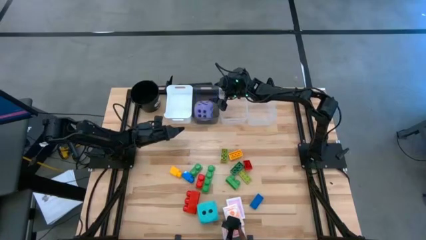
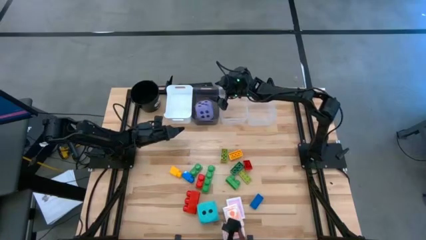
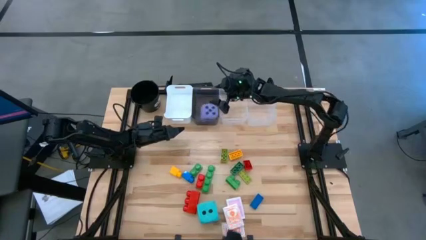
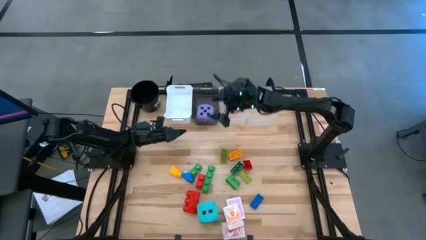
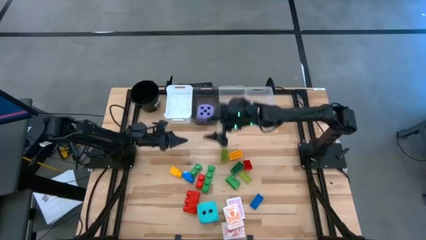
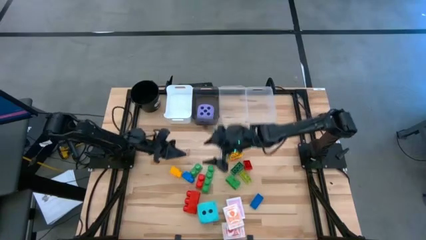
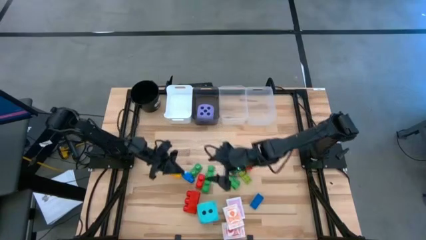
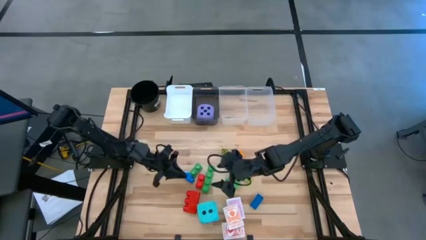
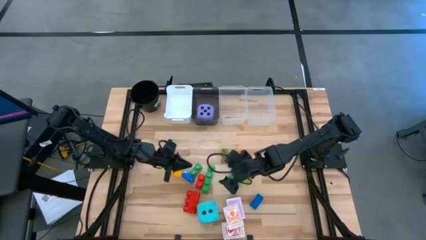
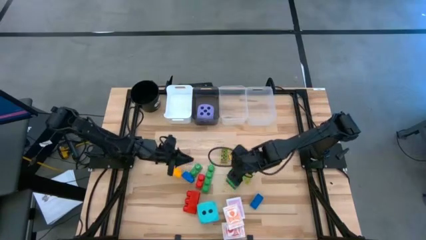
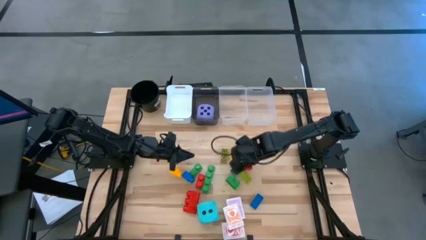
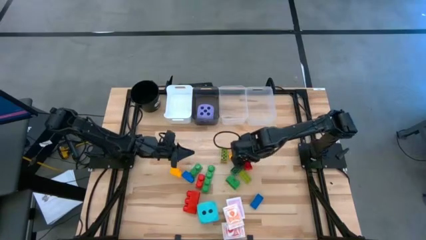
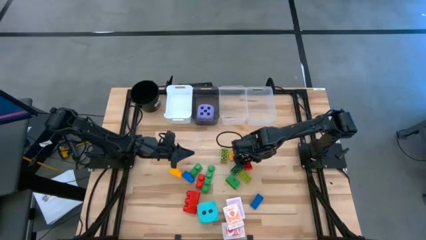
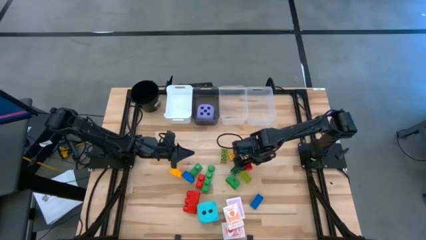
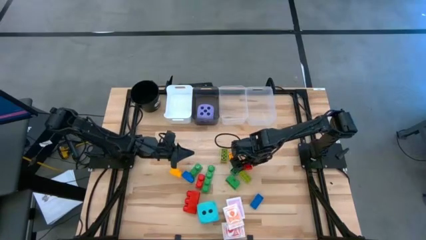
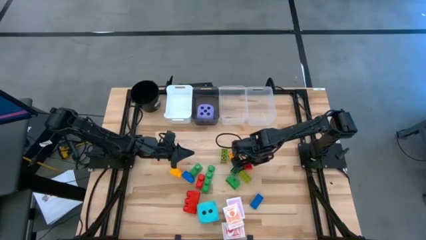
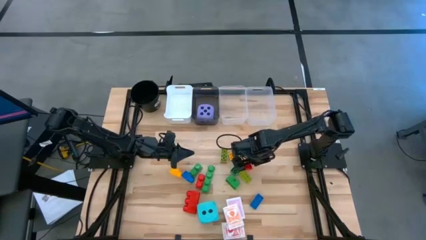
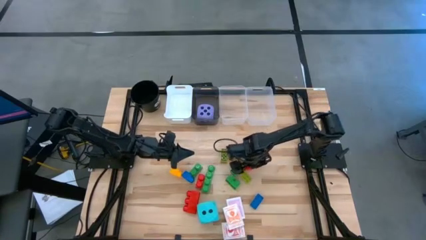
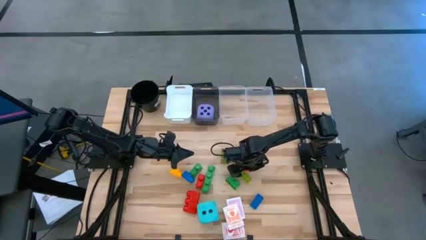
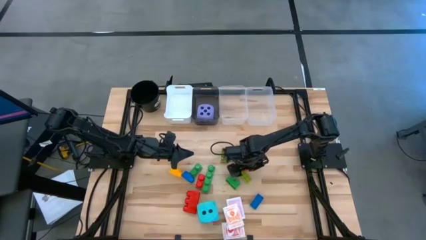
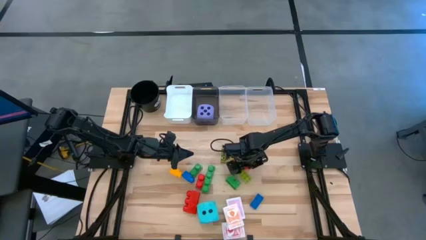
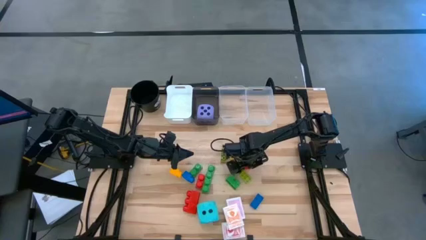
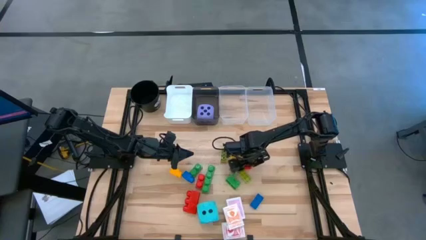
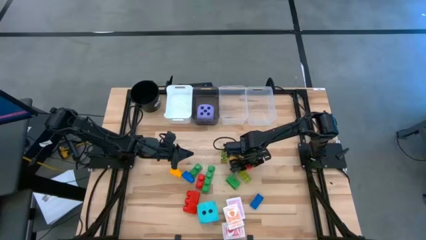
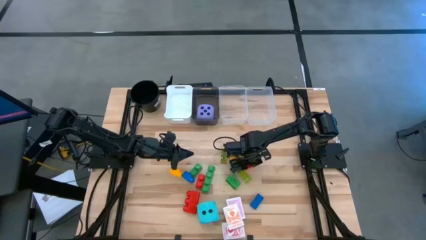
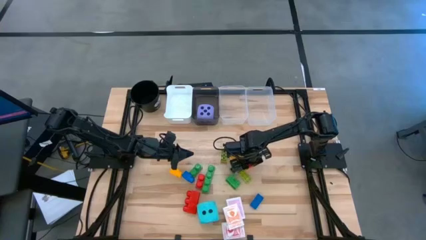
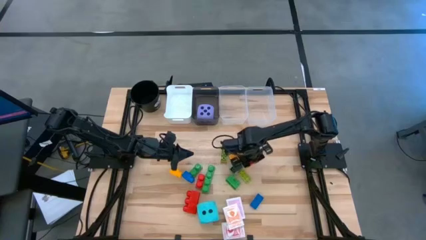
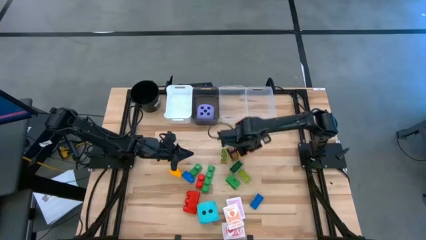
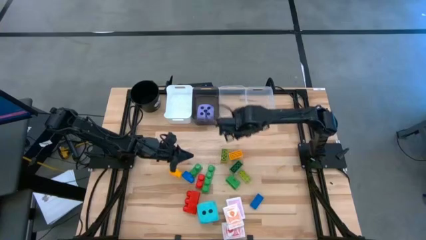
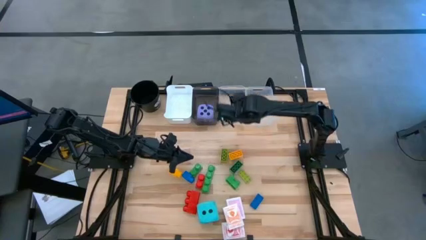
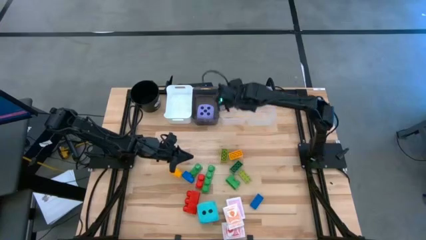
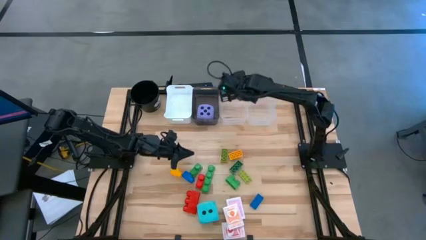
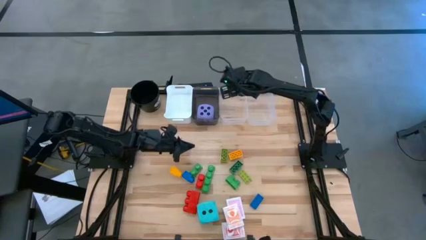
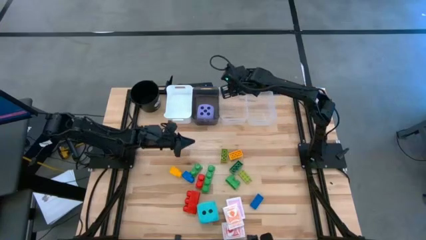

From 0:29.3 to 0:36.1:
Task: Pick & Place Toys
Put the red triangle game piece into the left transparent bin

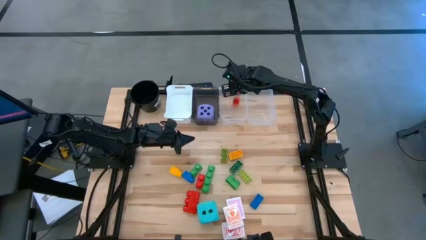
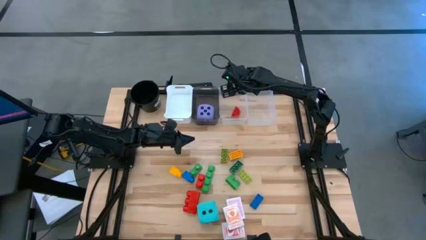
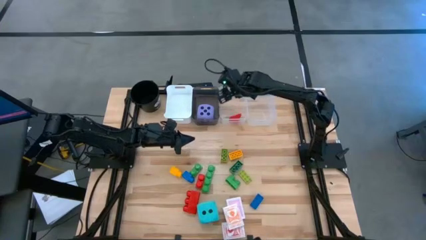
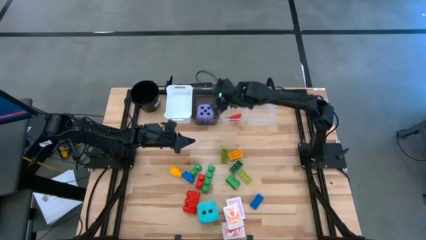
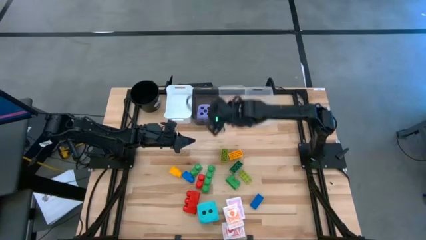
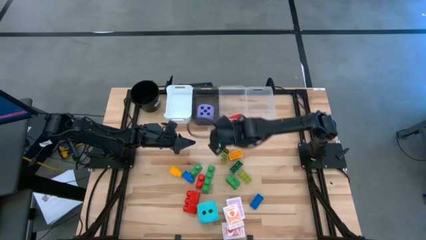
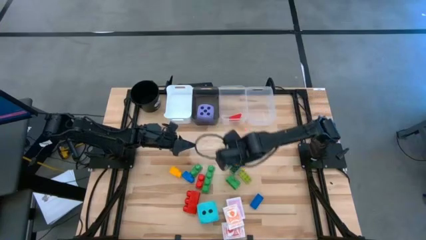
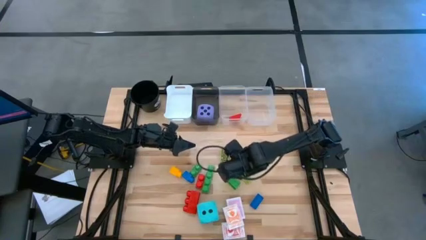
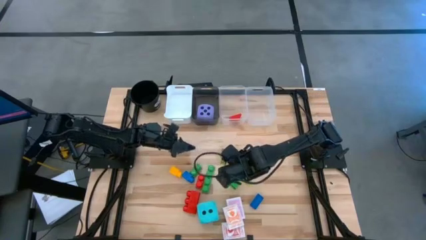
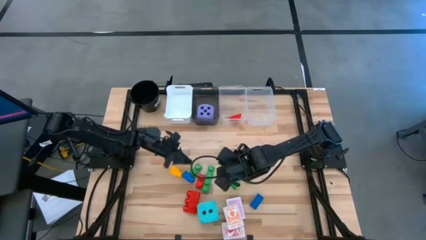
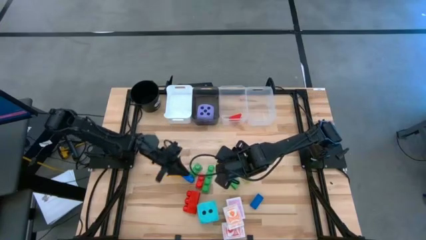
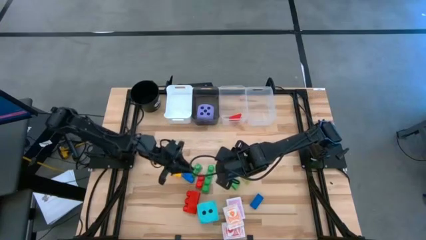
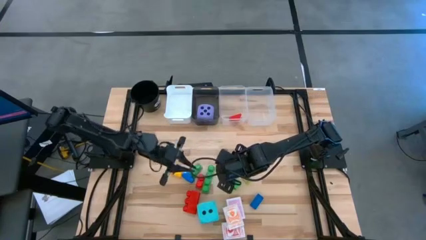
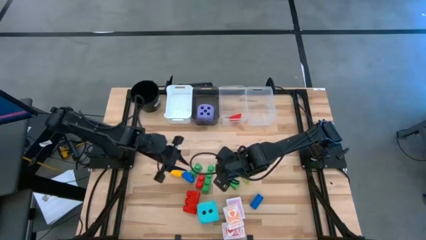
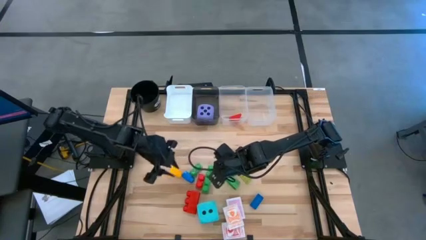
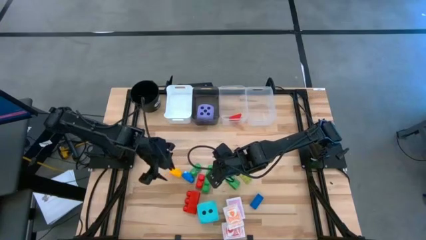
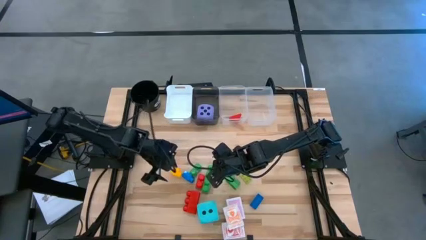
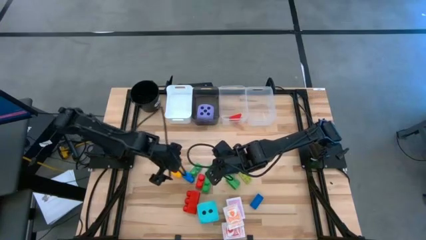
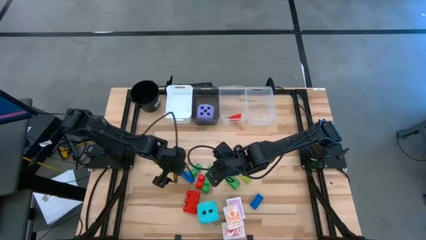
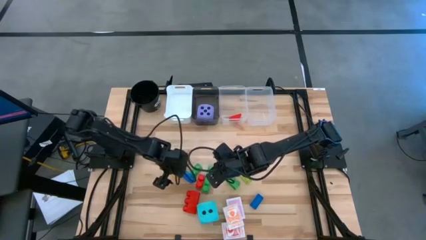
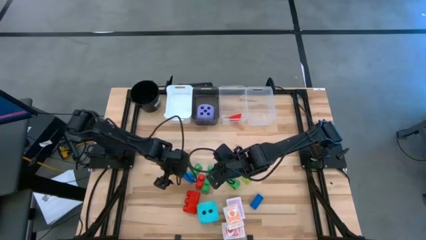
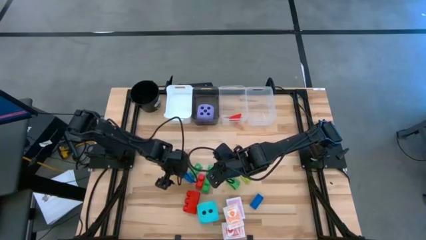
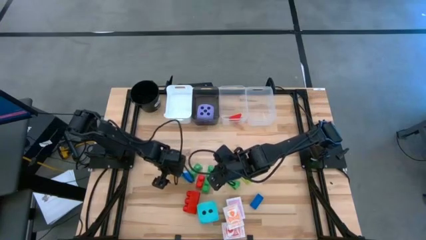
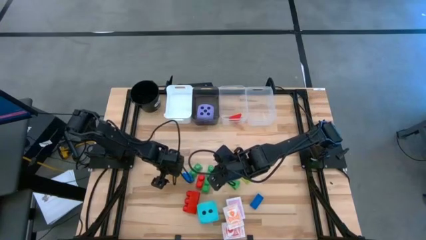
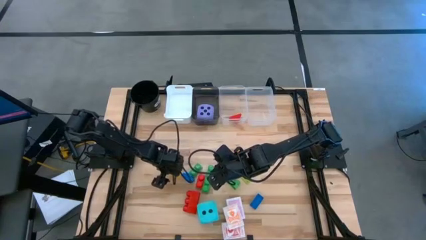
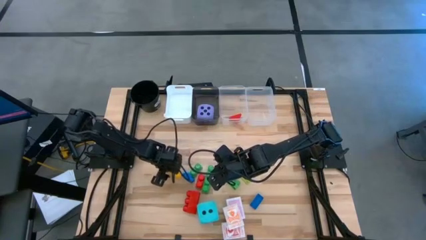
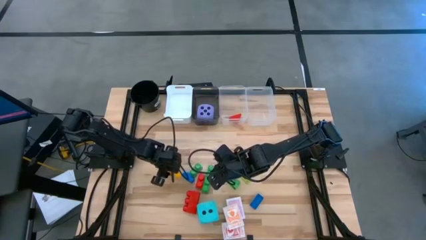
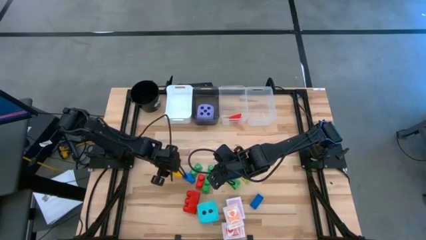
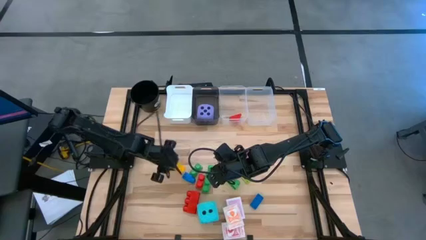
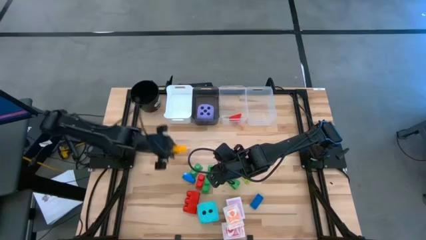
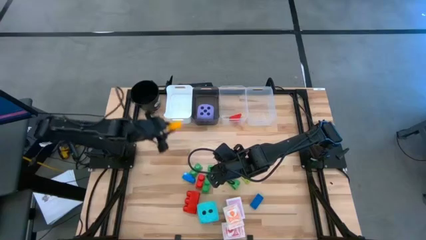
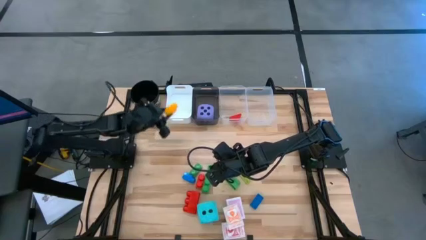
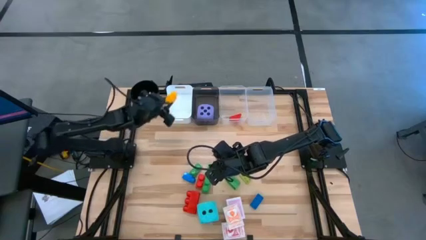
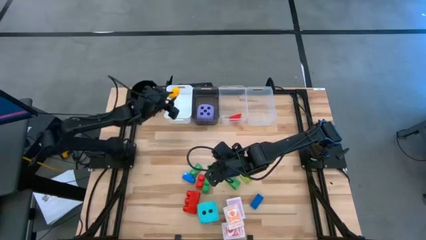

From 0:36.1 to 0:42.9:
Put the big yellow 1-stud game piece into the white bin
